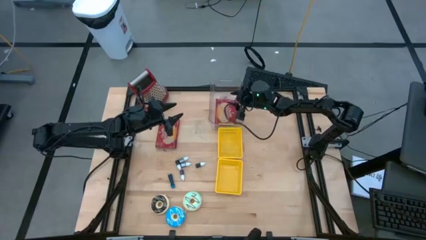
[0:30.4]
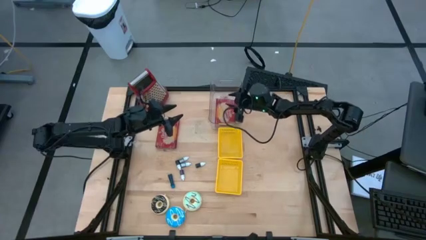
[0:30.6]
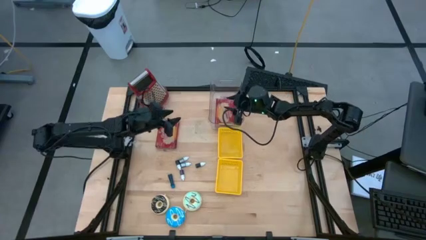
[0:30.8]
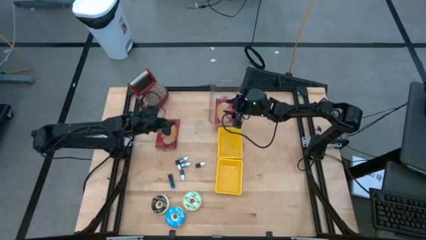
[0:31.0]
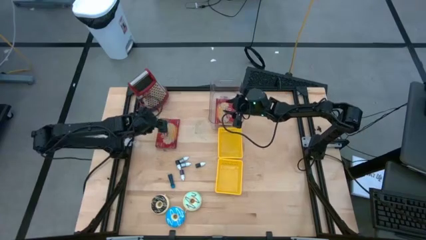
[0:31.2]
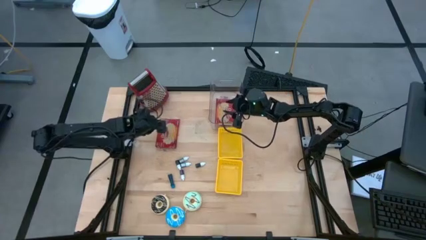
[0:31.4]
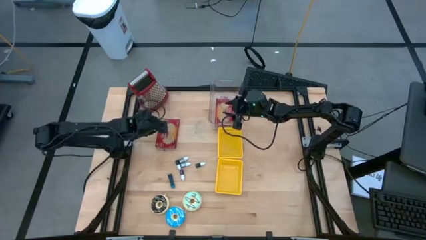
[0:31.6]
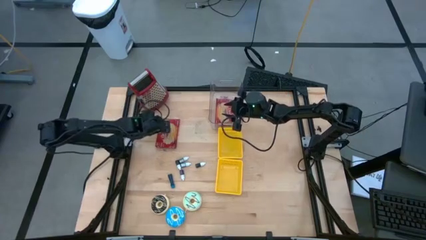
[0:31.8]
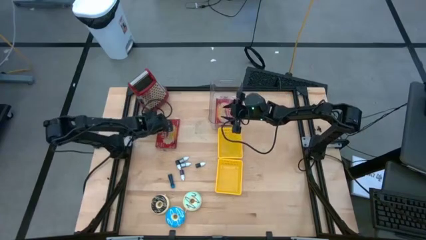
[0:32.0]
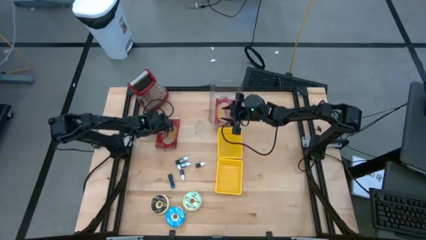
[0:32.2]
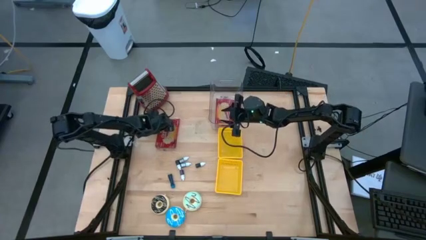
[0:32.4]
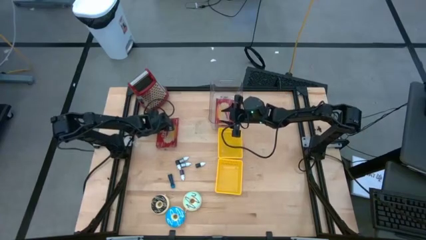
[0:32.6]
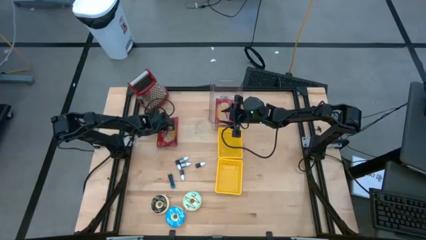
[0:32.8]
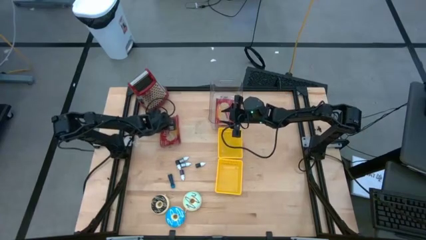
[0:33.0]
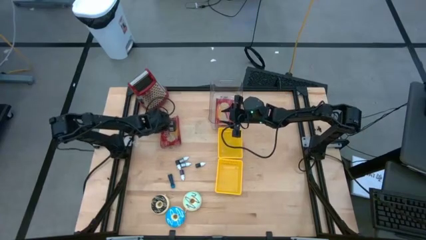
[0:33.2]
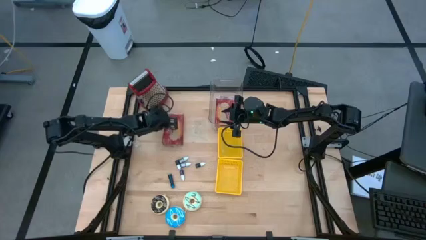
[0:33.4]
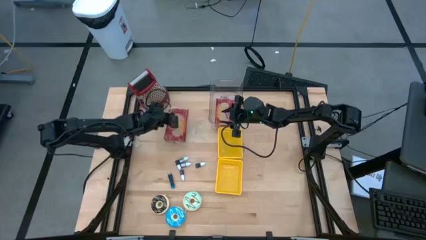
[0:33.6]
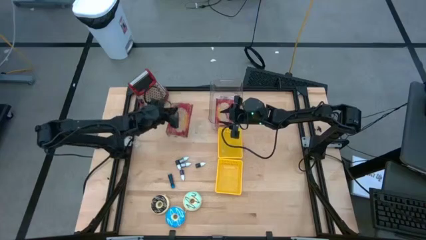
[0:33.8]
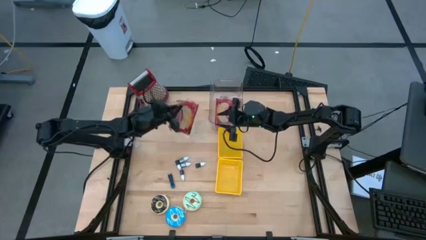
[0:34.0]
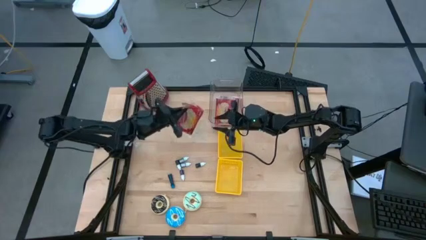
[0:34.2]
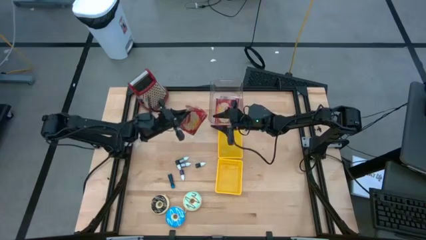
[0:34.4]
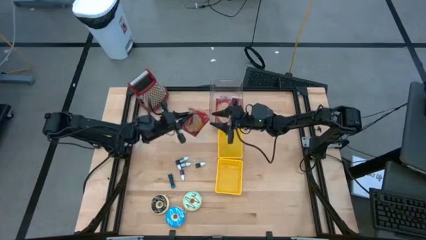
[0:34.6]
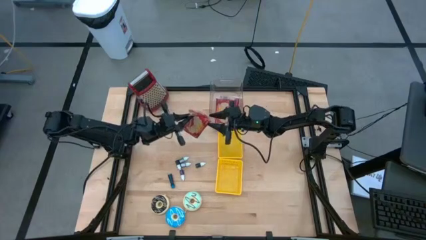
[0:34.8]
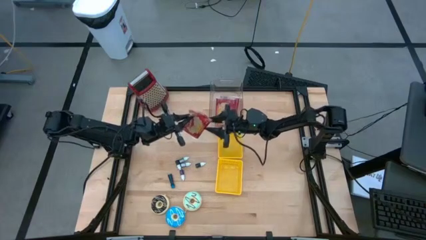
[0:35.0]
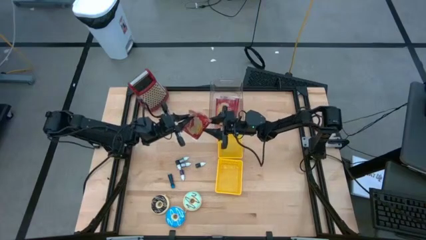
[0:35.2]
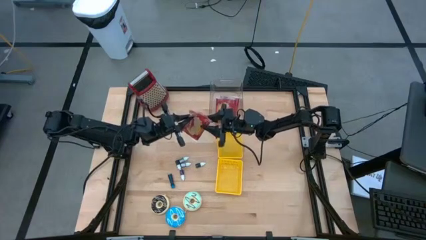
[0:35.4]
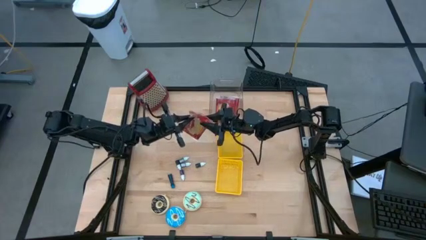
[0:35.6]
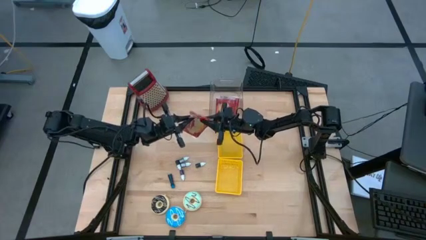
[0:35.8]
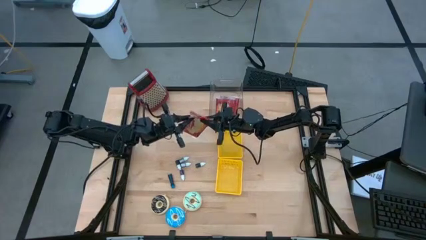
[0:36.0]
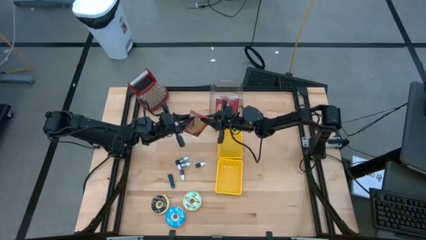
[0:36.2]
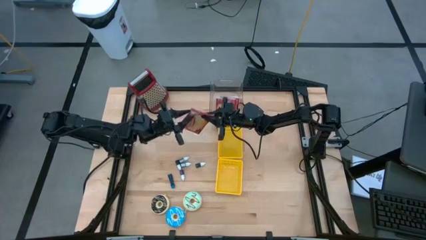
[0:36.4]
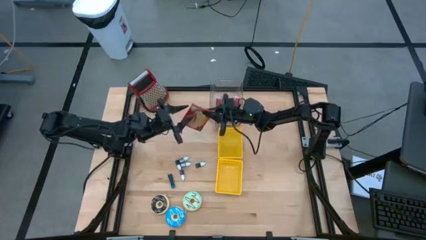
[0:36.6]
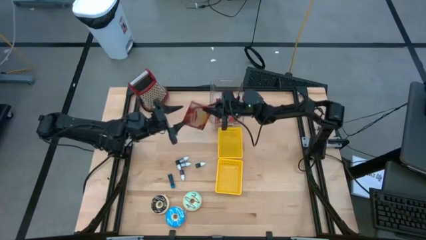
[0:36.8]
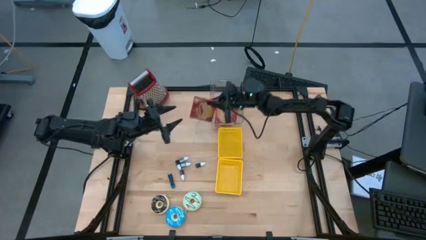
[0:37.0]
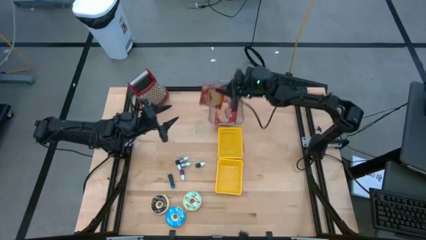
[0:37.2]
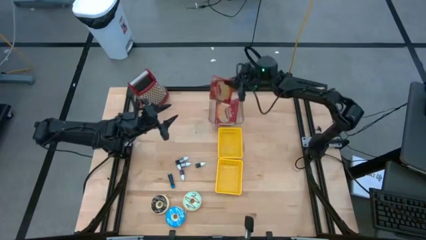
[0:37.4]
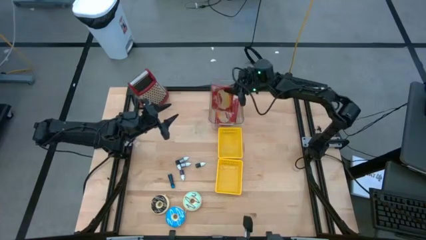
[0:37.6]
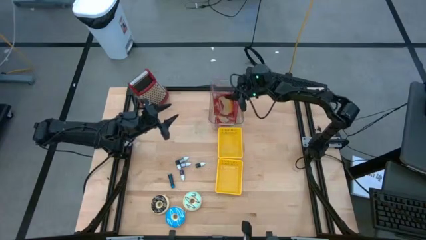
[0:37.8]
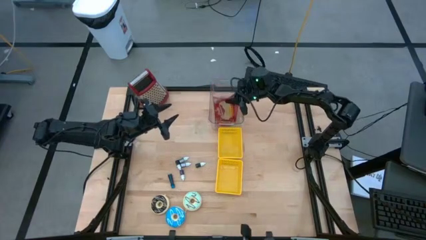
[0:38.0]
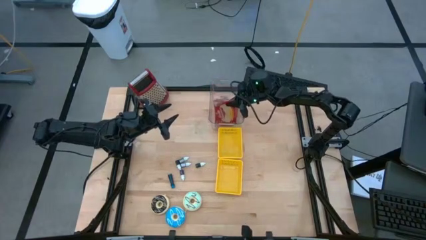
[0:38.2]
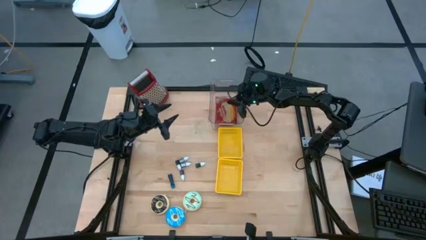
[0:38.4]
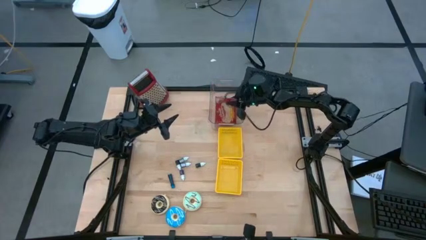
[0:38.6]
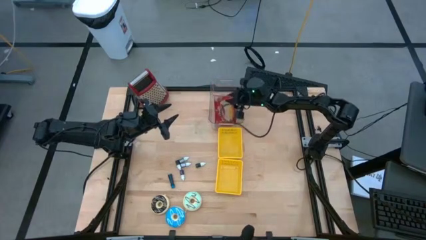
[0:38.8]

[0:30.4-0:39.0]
Put the red popcorn bag into the transparent bin

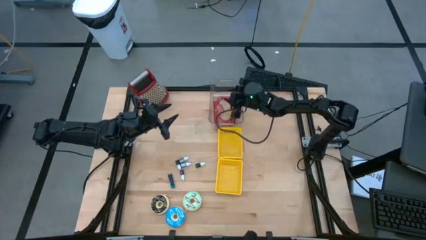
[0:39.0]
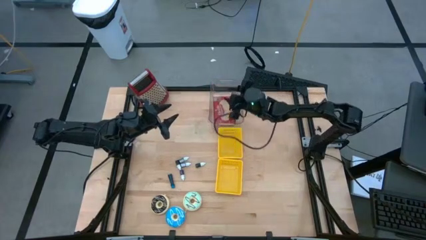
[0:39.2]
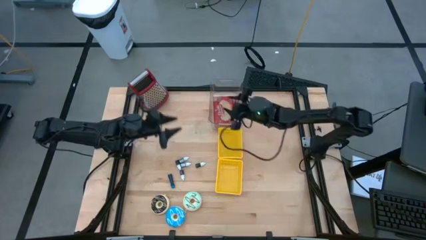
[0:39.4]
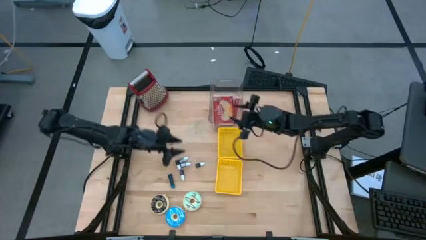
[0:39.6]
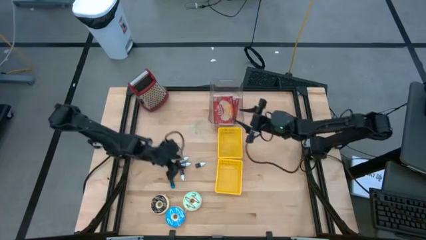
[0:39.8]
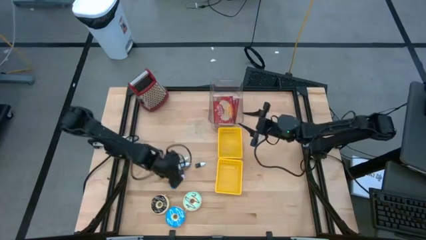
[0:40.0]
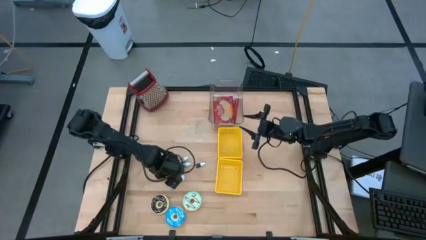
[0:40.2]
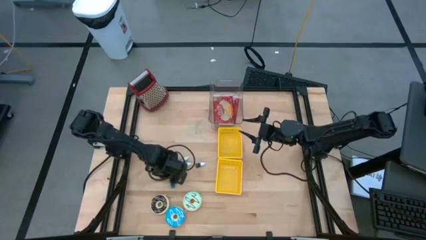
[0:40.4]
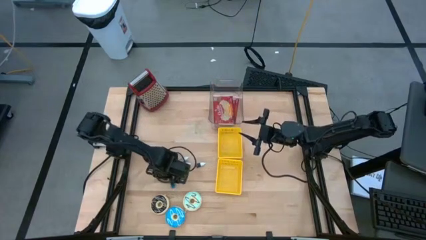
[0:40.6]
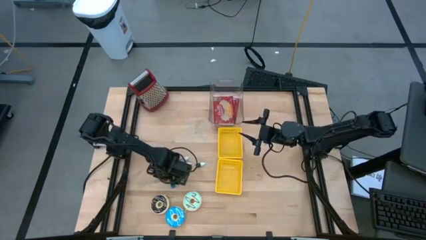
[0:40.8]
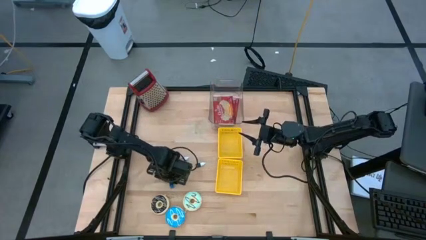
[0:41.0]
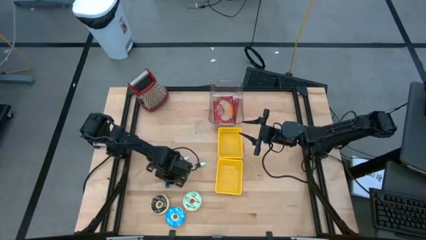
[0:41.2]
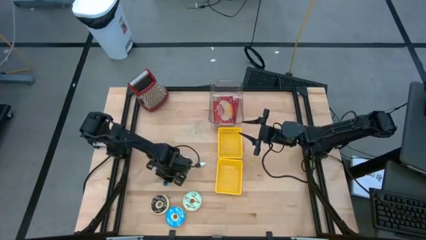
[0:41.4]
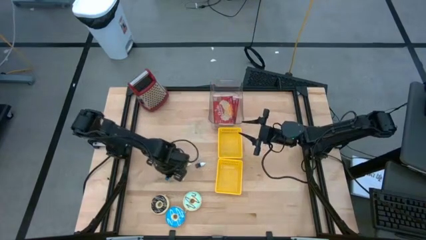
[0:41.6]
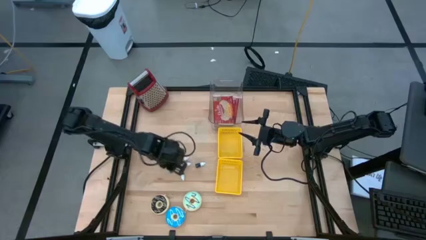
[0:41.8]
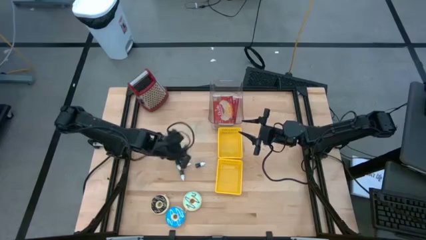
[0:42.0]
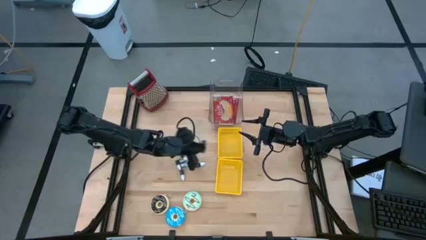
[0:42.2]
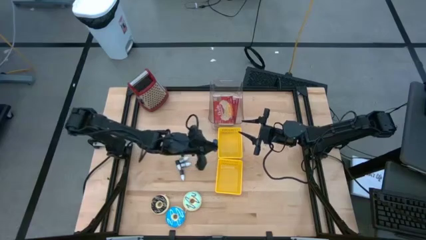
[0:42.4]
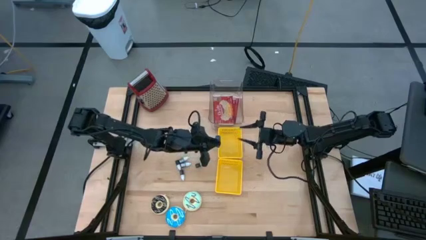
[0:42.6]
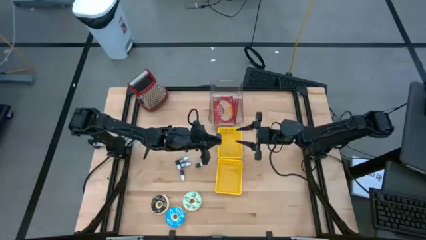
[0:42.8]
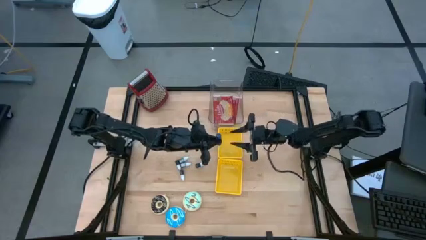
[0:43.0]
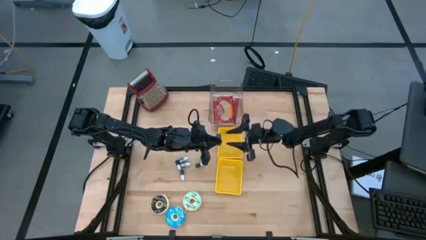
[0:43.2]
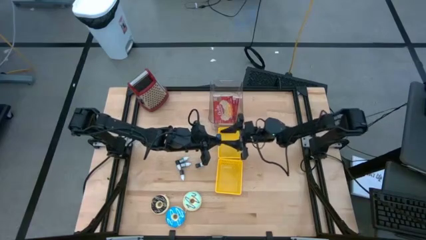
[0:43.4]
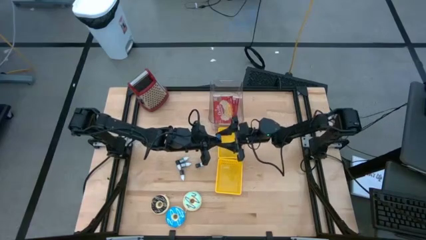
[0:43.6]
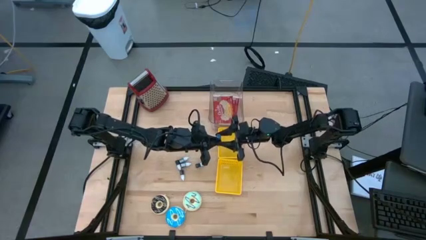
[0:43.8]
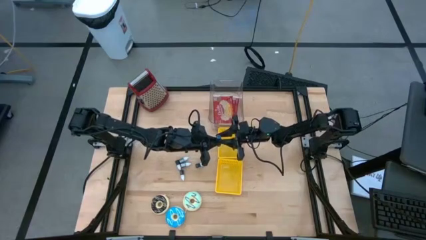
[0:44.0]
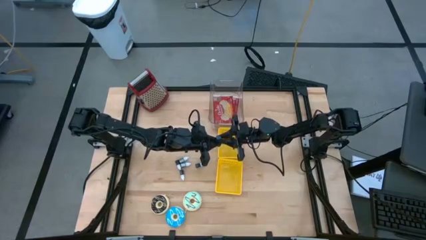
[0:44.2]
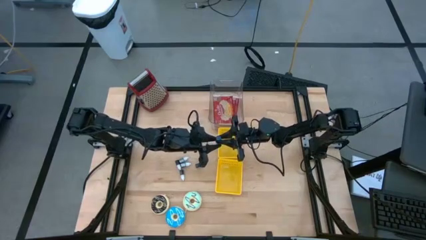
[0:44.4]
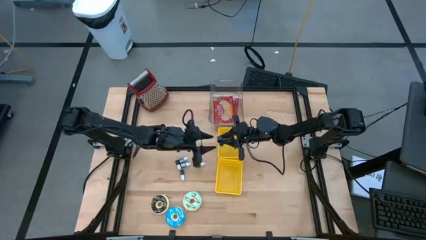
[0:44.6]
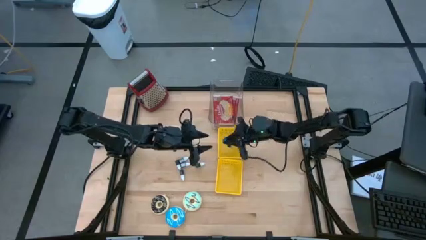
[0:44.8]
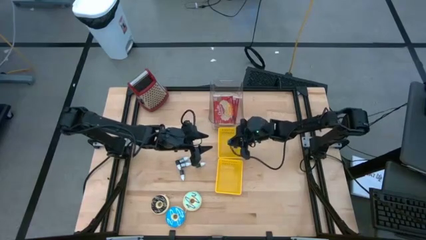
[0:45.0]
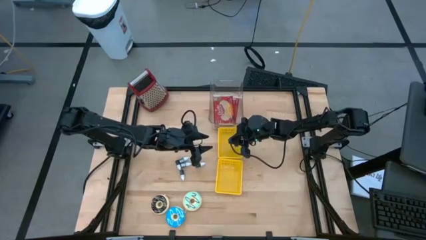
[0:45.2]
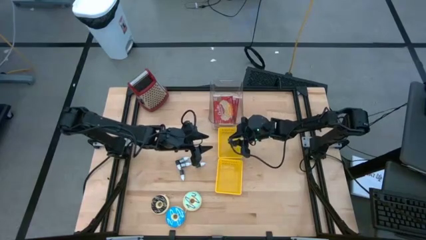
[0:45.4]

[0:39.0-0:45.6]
Put the blue food coloring bottle into the top yellow bin
